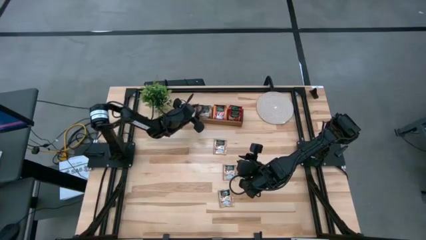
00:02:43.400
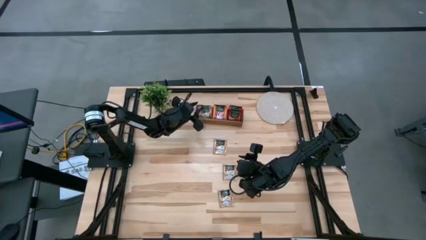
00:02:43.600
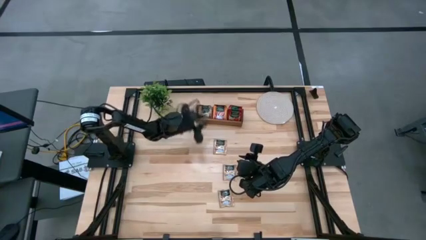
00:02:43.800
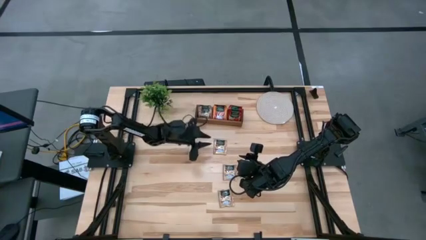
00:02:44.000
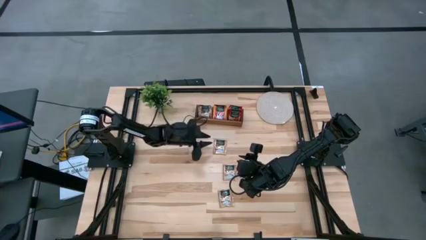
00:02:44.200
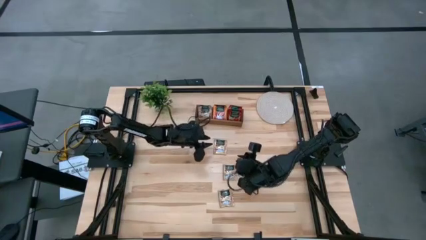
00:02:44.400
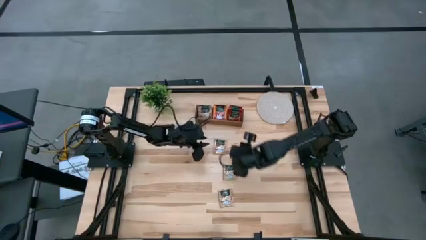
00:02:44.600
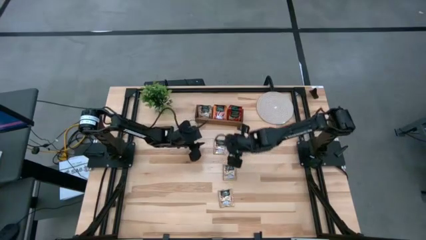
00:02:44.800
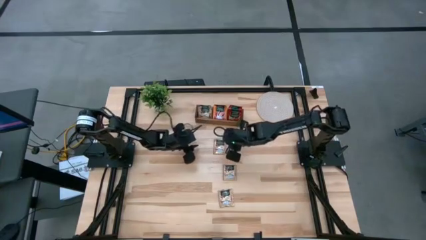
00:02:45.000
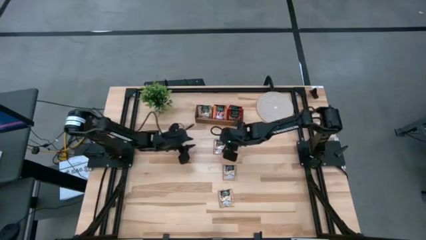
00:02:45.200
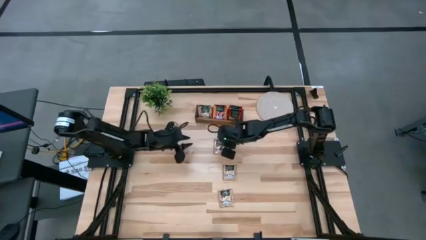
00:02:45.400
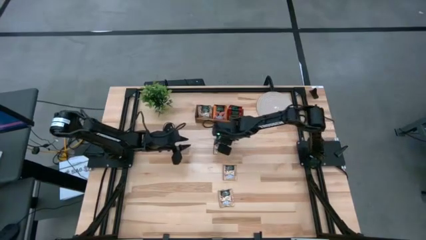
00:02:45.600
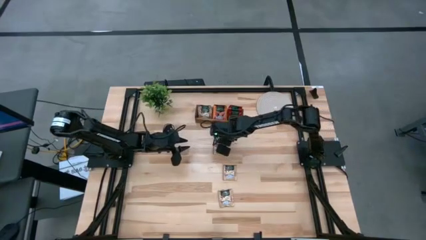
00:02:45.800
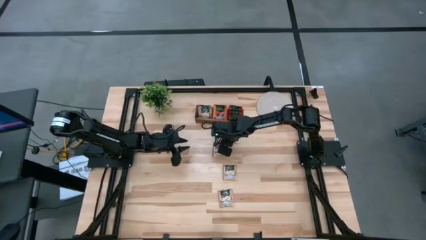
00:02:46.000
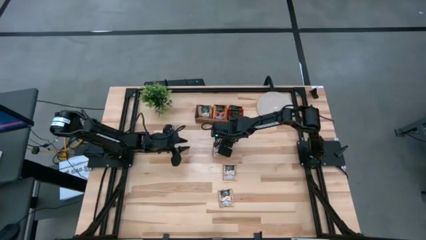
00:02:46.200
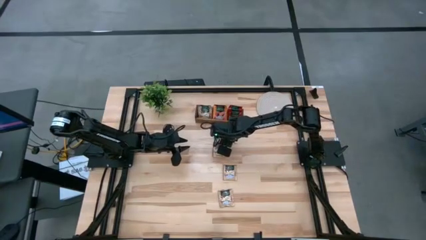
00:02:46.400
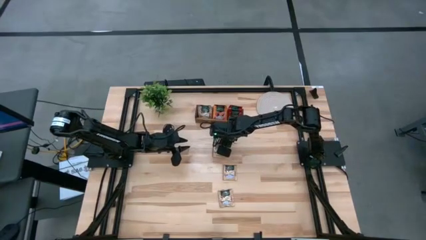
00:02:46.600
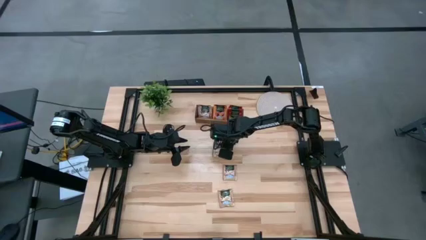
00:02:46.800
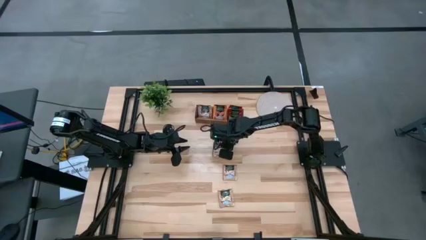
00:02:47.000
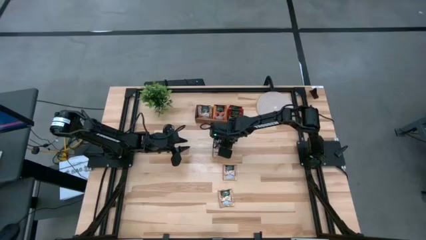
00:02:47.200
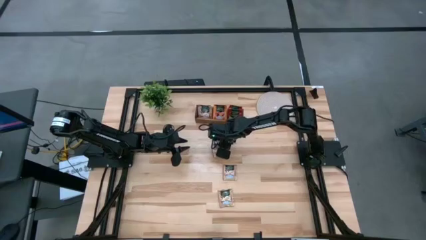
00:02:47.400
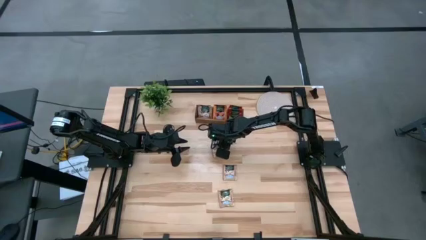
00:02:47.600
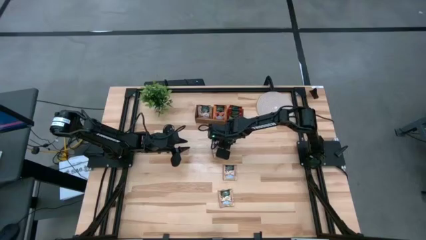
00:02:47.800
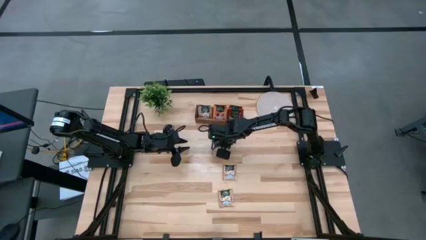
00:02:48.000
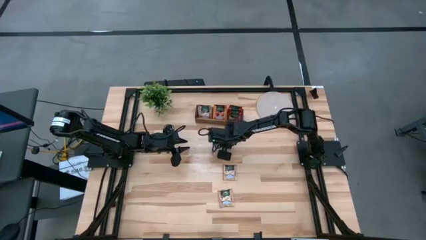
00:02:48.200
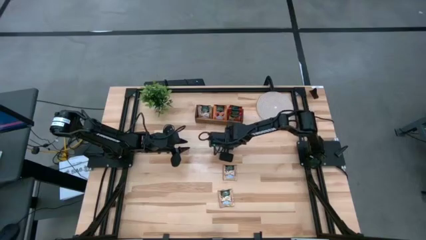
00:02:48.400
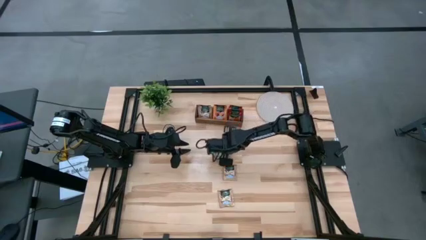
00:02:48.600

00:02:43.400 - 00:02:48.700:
Task: Pick & Place Tea
Put the brown tea bag into the left section of the wooden organizer

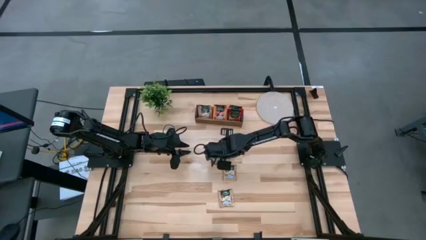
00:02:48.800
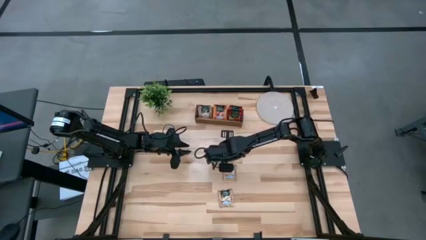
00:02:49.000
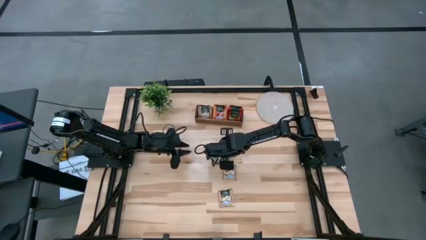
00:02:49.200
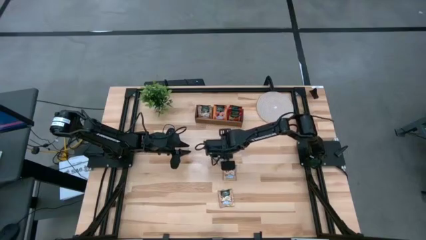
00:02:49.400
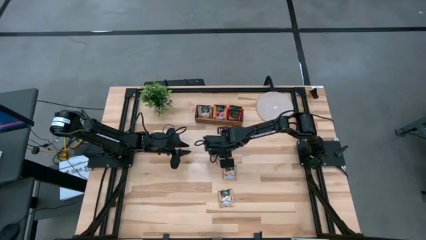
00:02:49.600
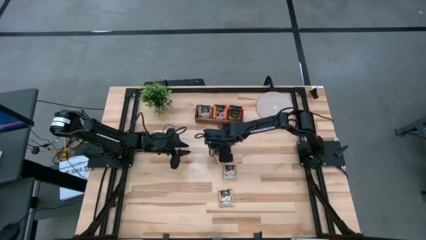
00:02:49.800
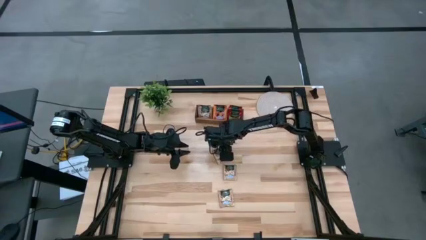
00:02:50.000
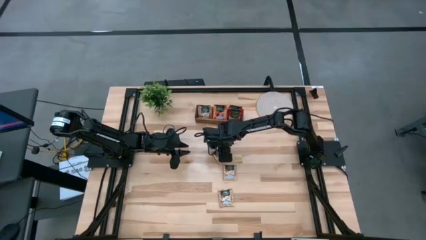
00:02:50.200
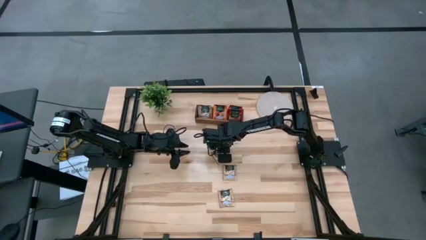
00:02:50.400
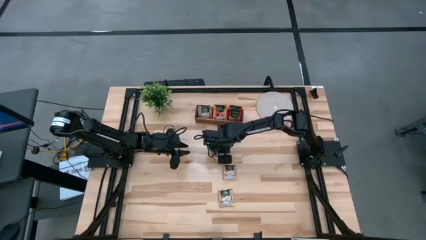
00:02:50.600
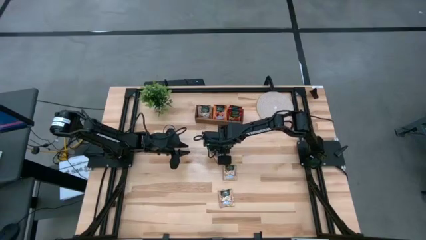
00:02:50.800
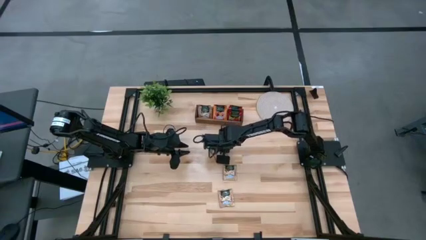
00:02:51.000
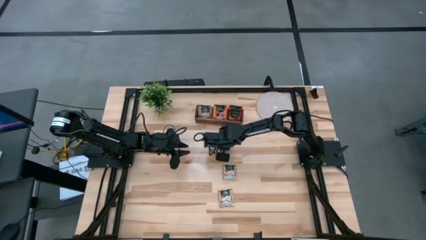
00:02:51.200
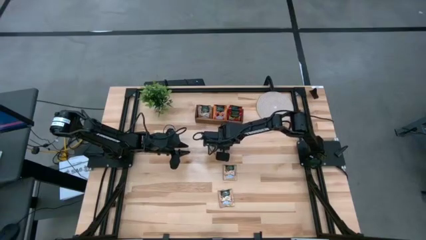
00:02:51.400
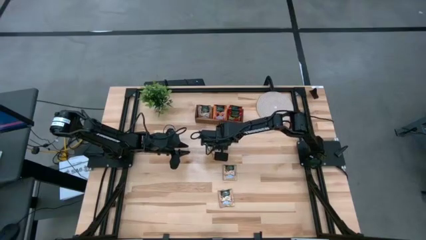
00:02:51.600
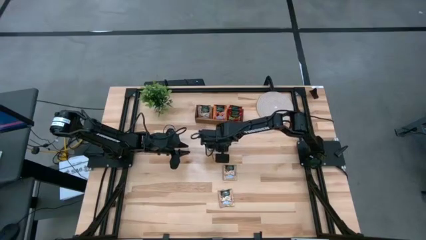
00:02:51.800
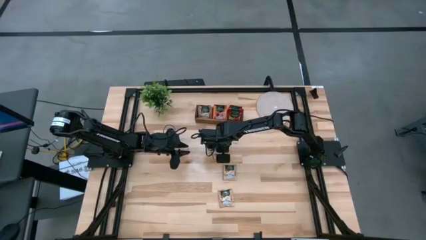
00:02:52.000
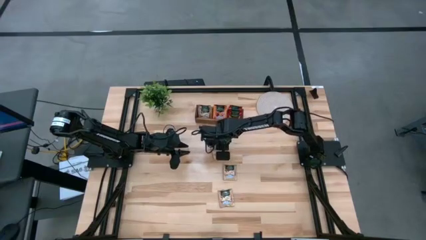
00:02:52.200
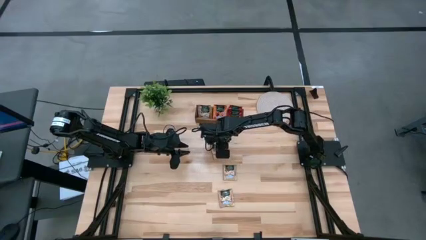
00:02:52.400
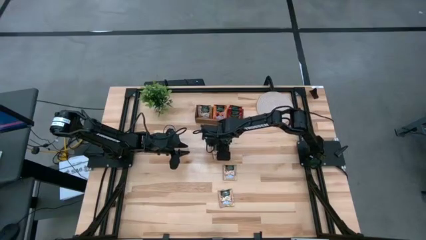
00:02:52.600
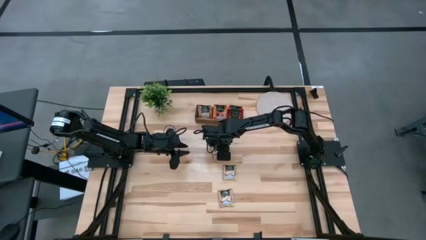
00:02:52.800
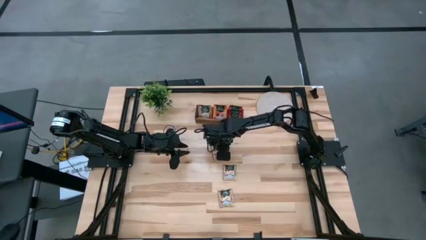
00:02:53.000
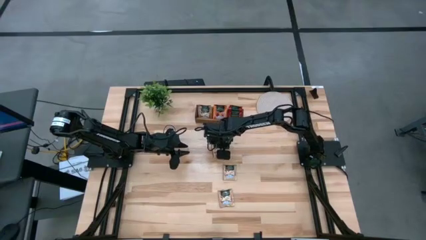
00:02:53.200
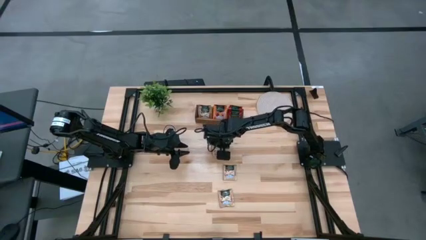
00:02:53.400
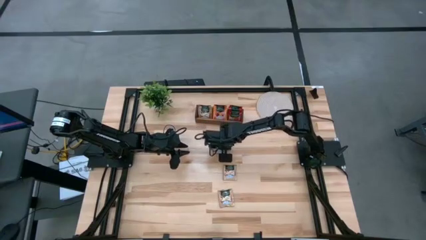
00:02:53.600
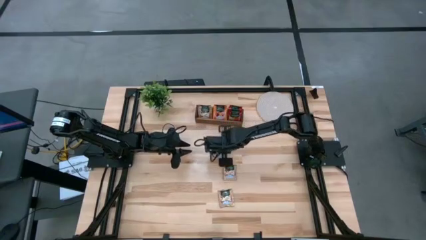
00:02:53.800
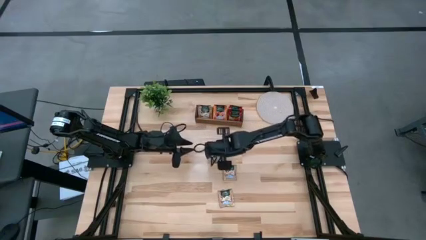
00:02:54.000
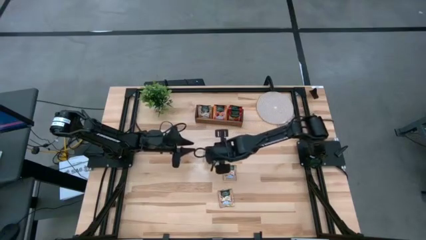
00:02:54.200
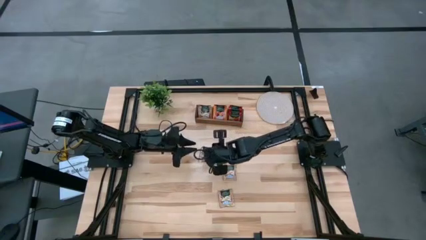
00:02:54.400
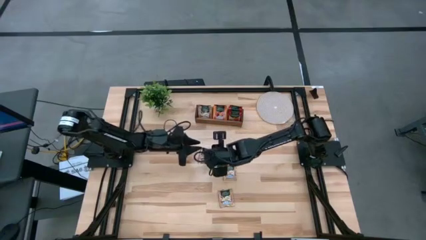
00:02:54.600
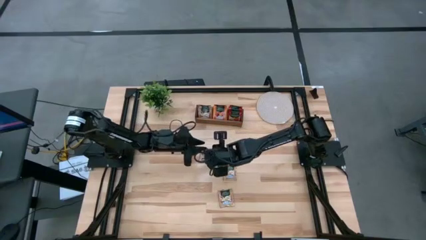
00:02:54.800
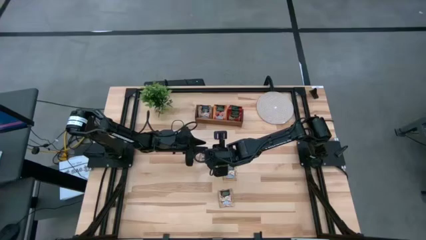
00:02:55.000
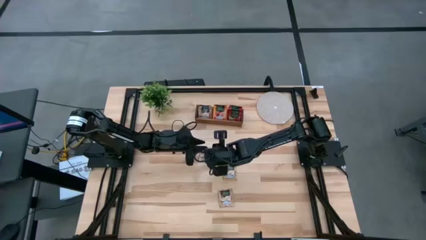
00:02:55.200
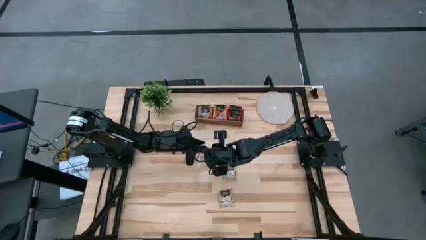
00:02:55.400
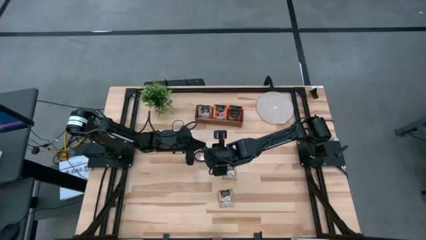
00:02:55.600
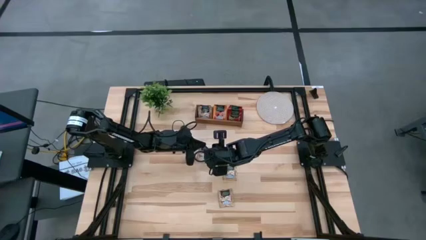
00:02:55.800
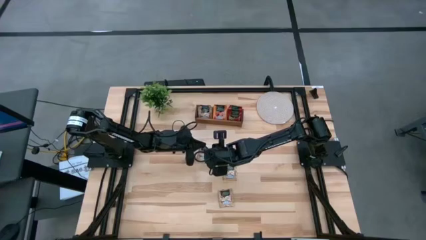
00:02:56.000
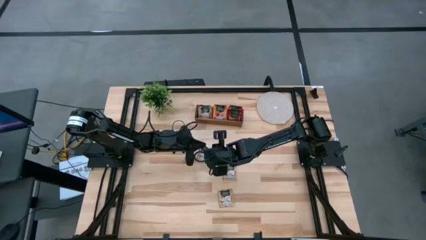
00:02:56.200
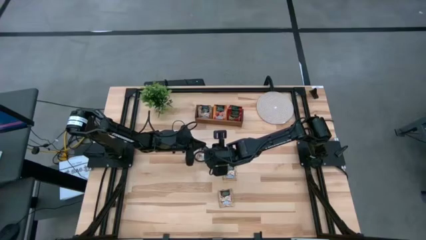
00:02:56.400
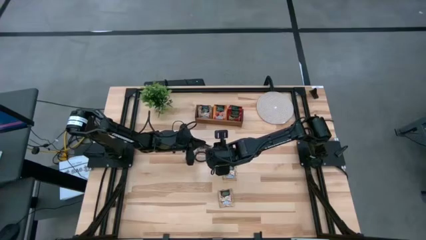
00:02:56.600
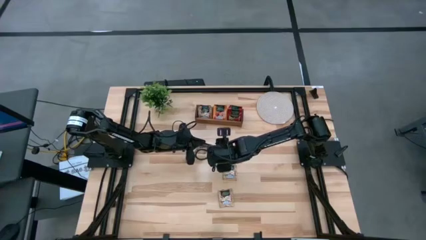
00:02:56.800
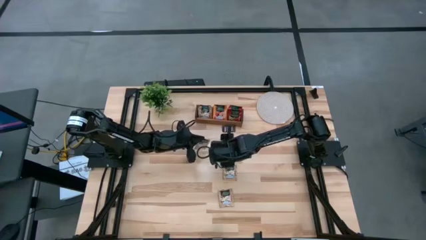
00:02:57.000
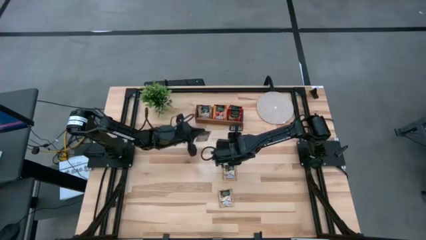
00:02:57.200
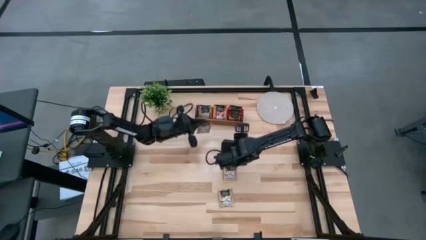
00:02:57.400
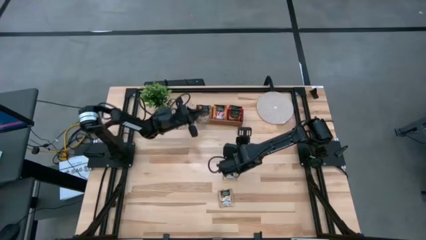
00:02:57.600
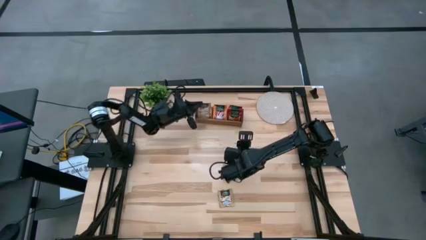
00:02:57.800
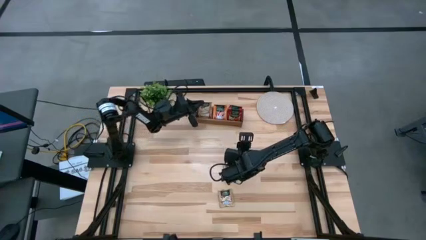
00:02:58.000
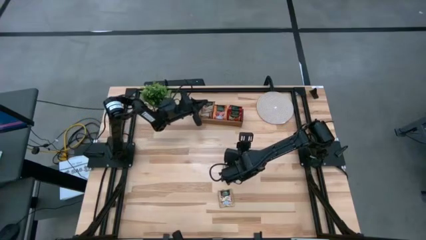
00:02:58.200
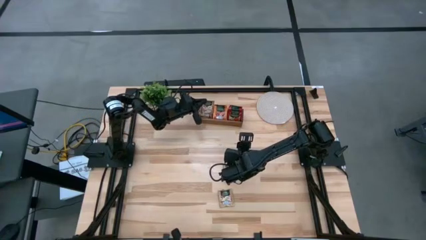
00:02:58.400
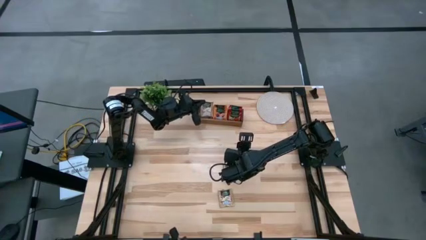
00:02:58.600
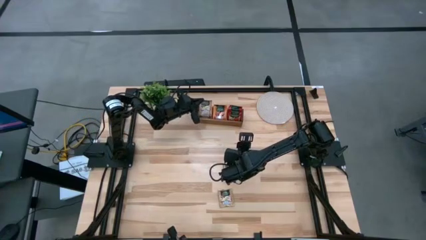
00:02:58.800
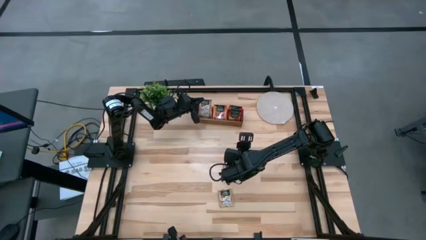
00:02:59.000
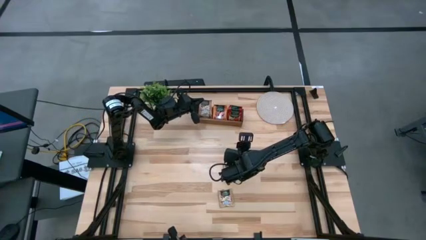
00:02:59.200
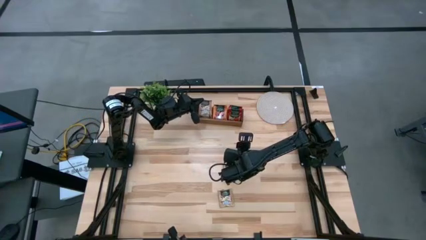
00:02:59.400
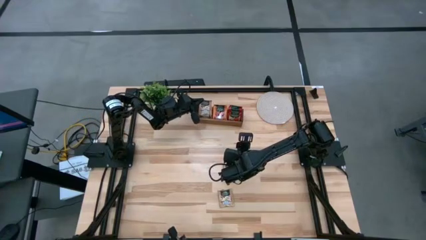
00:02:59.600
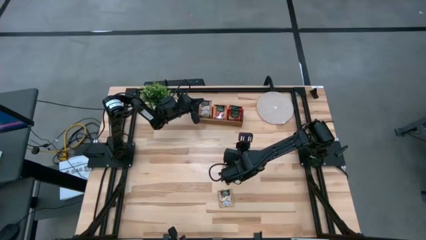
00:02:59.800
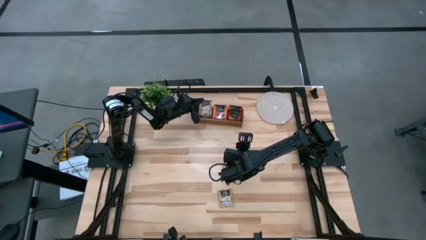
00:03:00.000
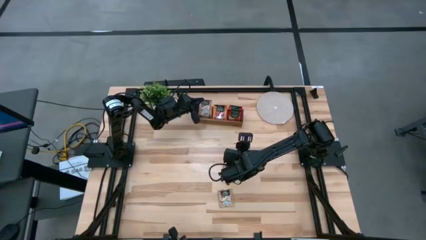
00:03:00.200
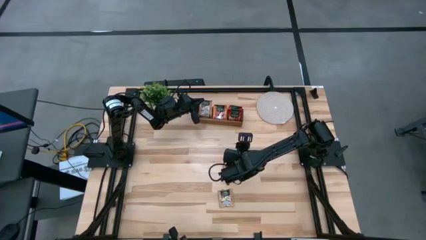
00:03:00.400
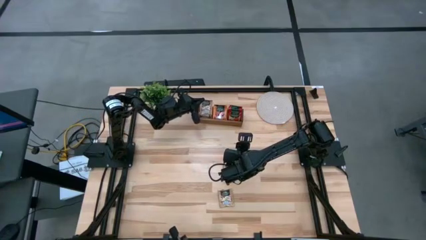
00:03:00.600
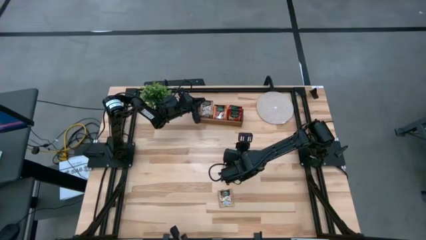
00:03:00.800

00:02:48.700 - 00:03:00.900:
Put the brown tea bag into the left section of the wooden organizer
